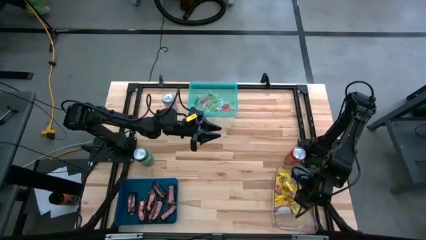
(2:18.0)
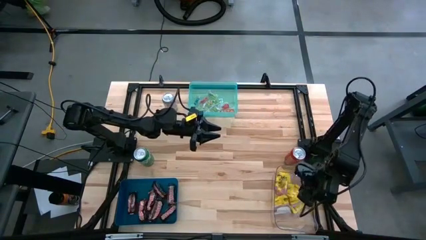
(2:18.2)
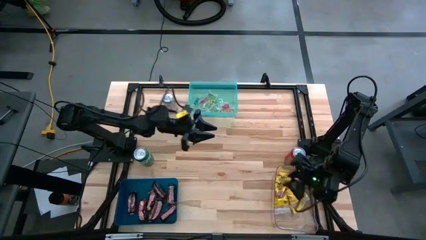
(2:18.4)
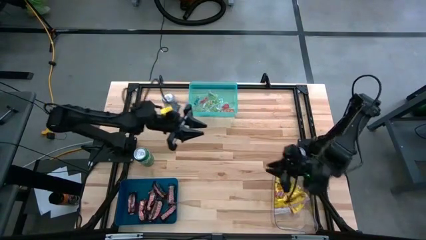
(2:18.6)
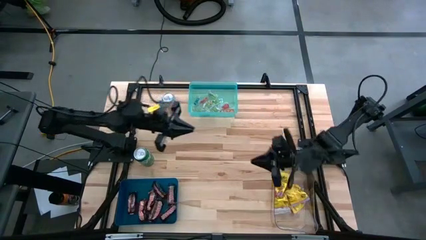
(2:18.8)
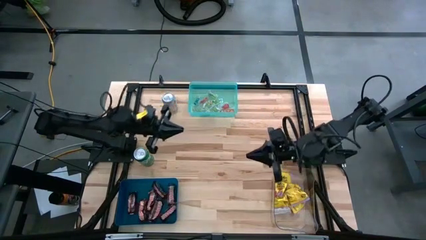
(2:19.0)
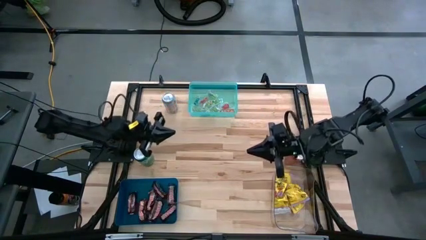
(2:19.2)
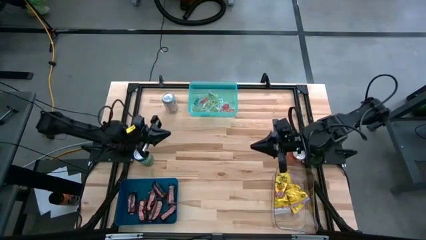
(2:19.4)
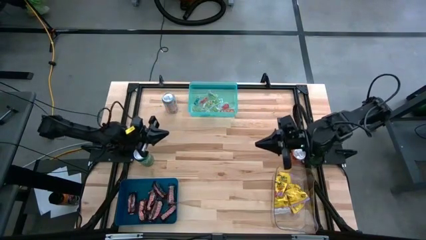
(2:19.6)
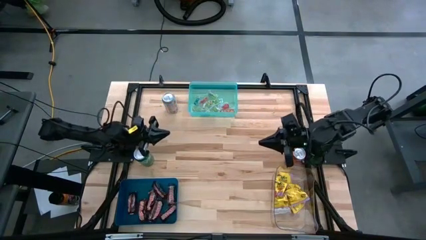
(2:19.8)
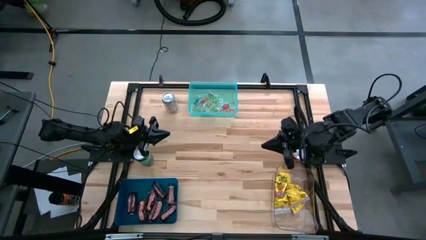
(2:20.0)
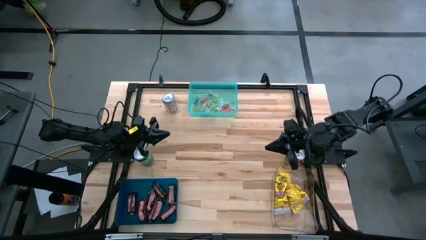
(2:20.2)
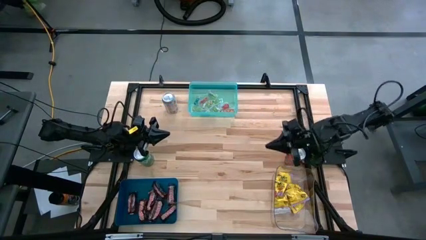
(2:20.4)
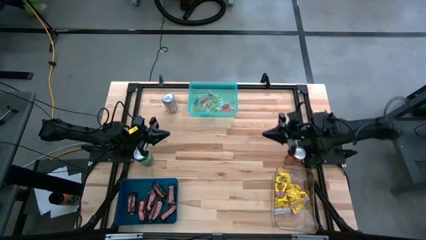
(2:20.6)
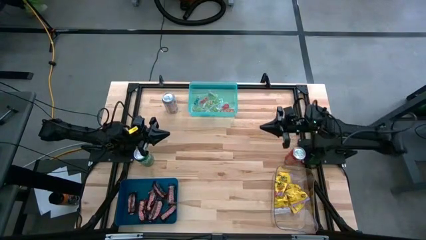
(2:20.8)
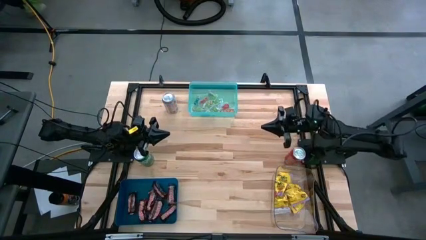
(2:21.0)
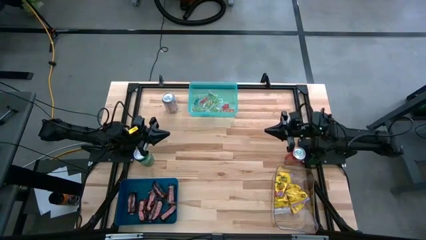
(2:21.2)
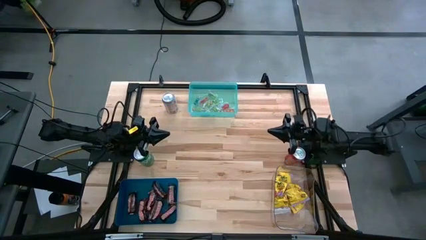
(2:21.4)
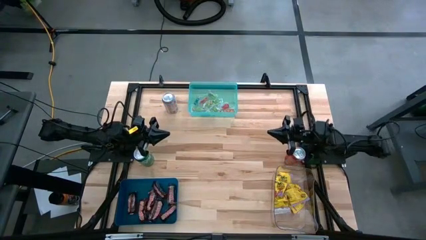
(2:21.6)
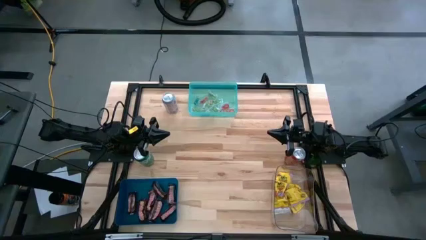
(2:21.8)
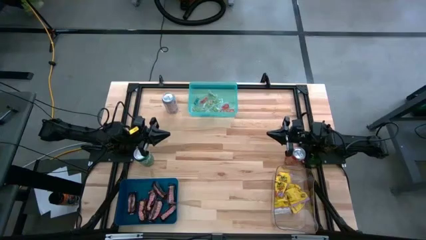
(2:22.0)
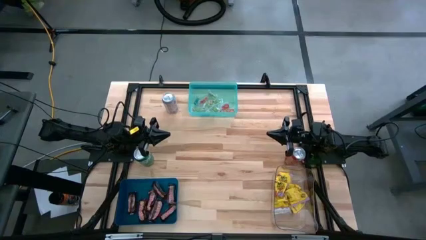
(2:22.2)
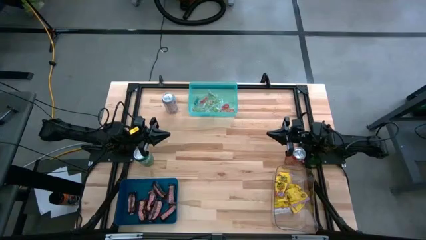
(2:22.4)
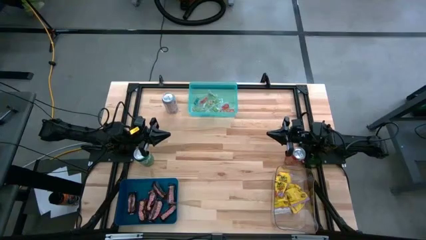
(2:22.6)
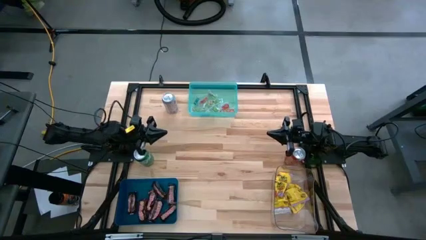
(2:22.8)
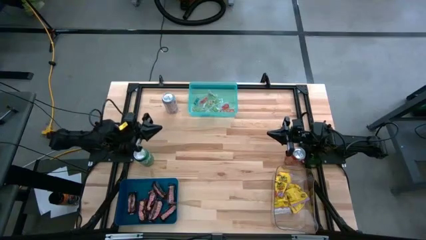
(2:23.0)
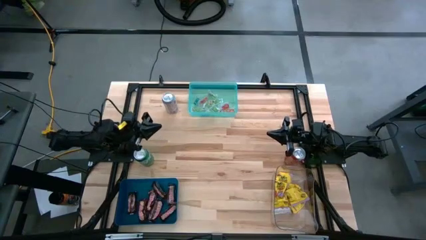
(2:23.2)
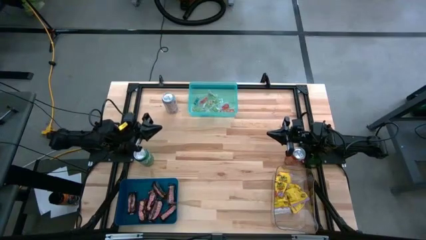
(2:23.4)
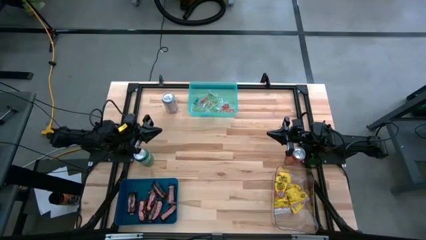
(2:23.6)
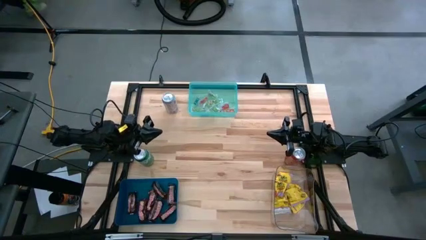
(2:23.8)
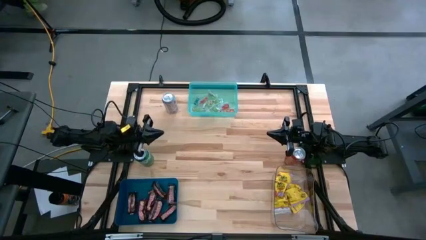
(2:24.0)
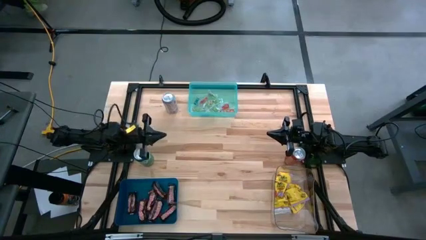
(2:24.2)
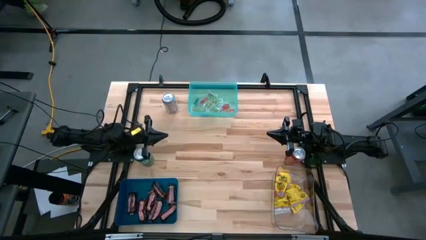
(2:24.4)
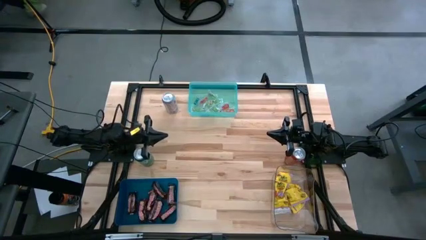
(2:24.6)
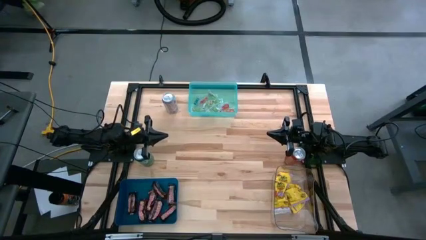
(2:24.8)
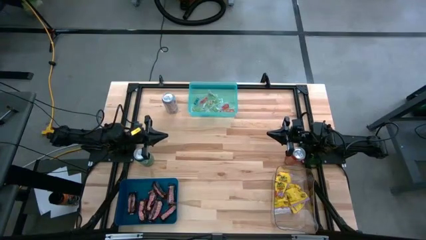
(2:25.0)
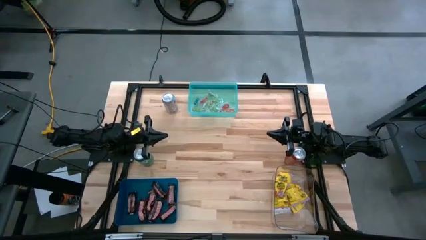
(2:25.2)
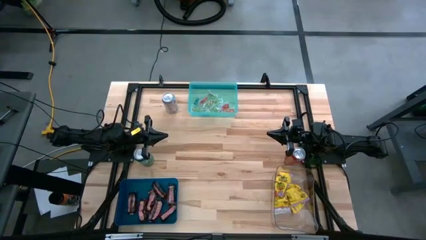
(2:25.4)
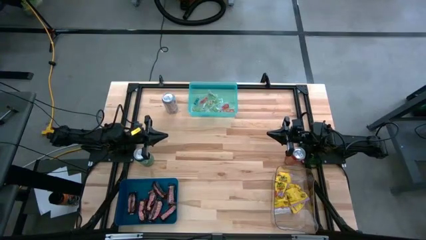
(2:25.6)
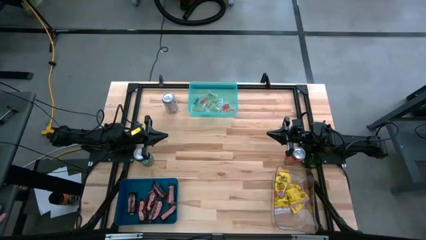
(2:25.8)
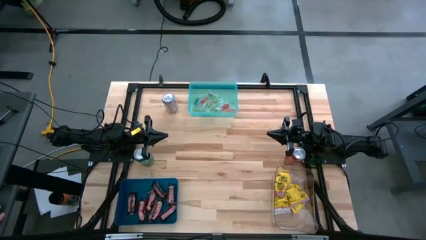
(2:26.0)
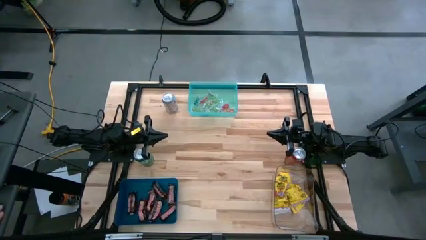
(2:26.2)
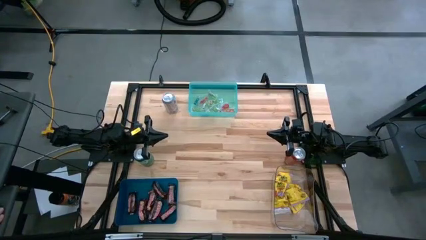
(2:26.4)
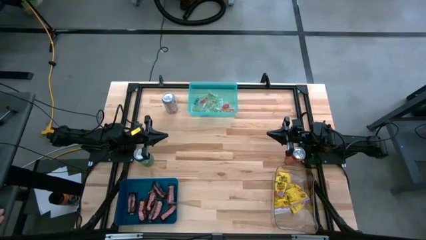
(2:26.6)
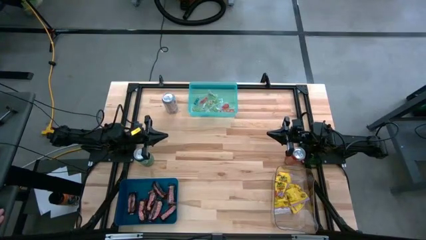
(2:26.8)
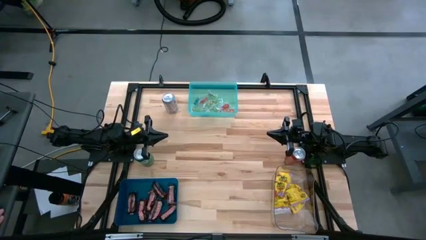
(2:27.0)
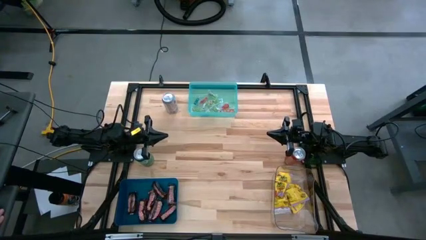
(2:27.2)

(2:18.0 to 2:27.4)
Task: Sort candy
Return to home position

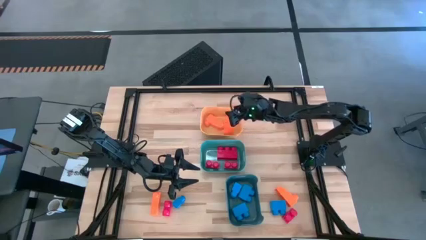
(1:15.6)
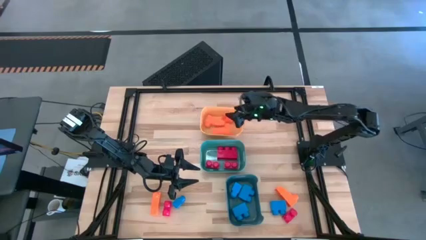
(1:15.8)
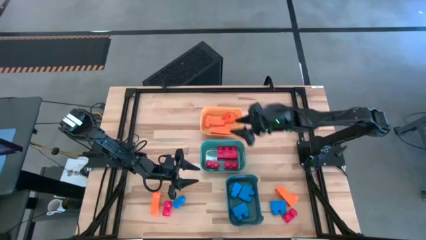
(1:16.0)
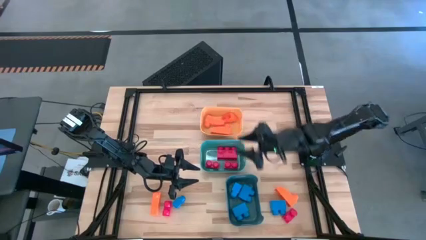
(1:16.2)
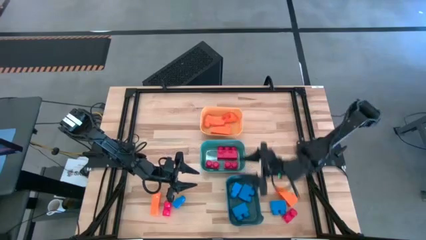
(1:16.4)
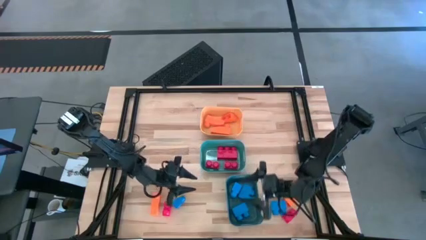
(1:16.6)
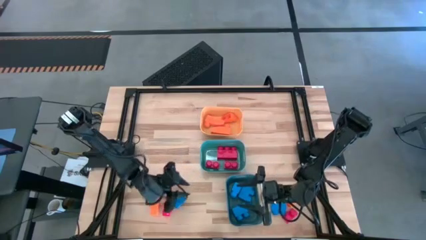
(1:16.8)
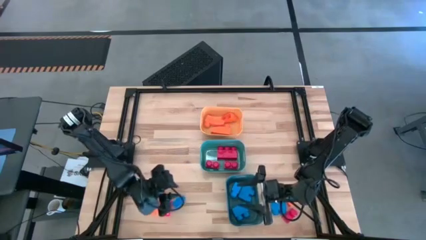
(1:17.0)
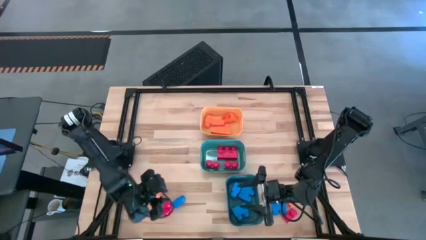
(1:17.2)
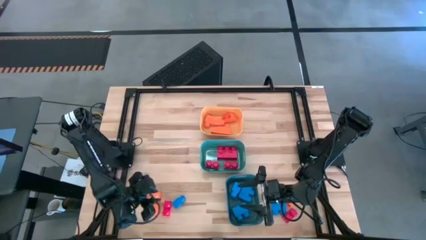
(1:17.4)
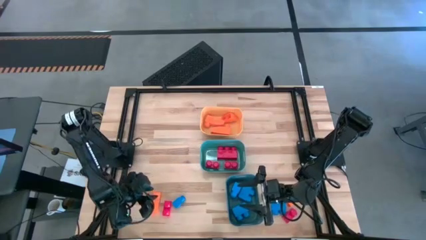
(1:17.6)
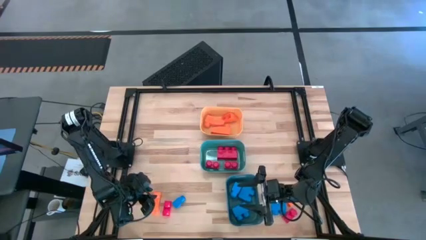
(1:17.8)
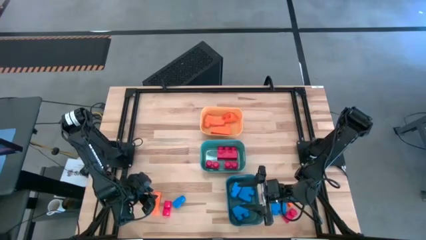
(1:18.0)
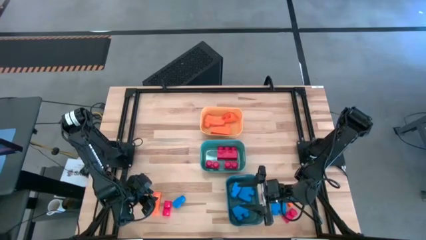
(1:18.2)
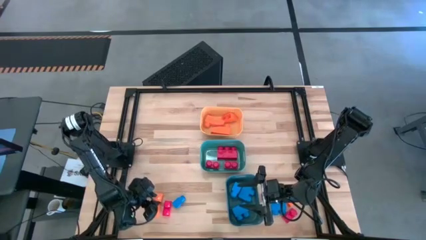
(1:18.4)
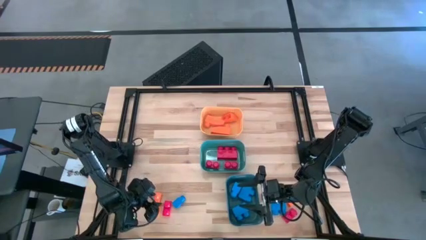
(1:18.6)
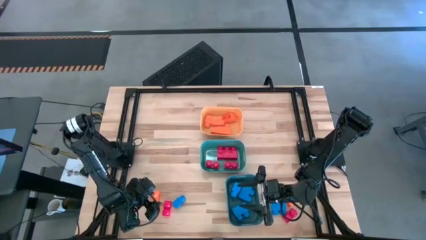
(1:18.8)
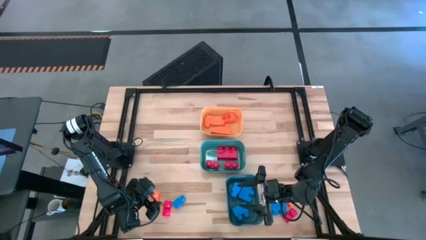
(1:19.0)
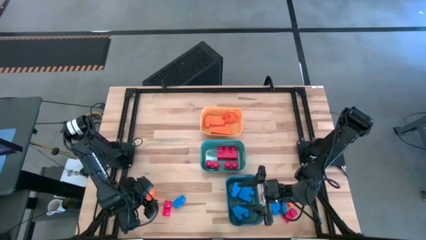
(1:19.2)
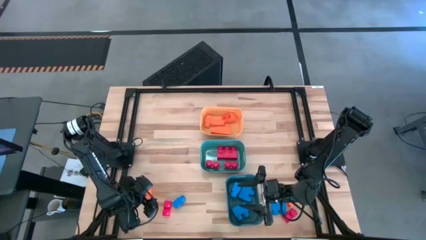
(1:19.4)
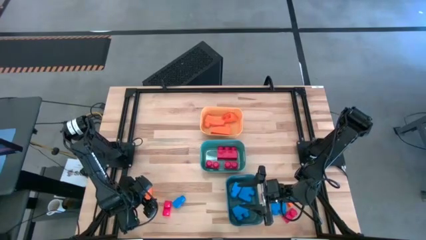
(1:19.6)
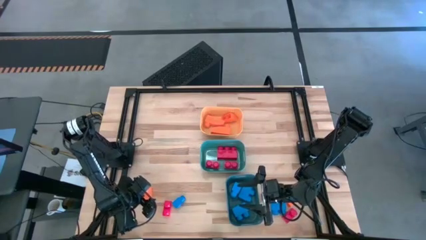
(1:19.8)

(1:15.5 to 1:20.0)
Task: Sort & place blocks by color
Put the orange game piece into the orange bin

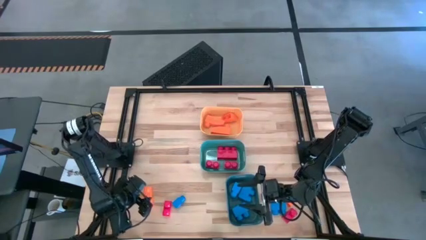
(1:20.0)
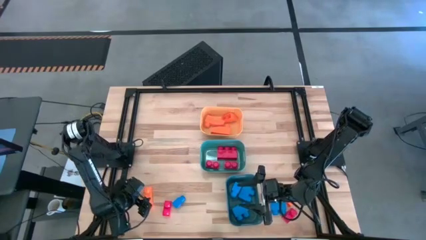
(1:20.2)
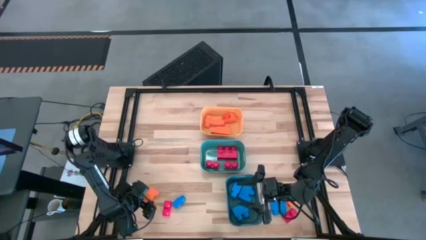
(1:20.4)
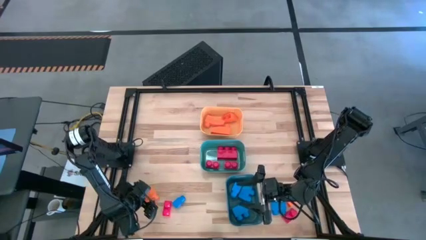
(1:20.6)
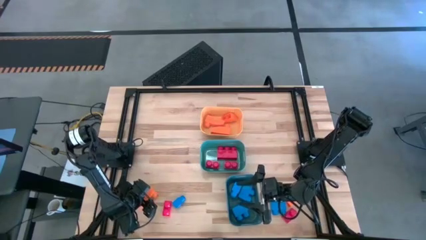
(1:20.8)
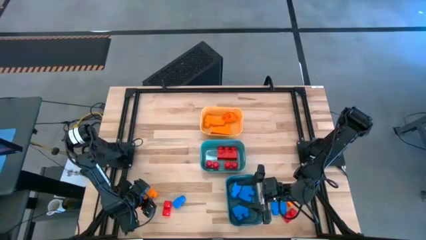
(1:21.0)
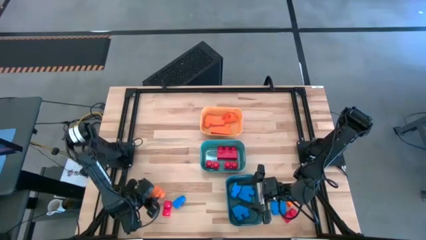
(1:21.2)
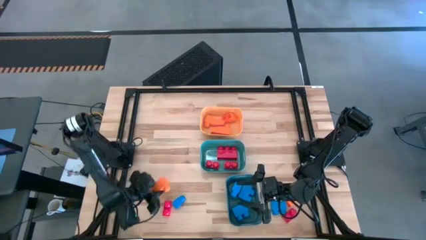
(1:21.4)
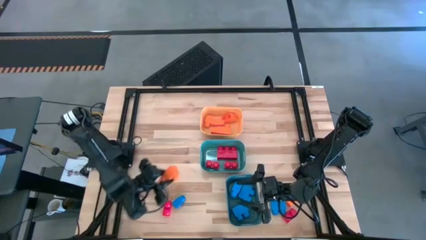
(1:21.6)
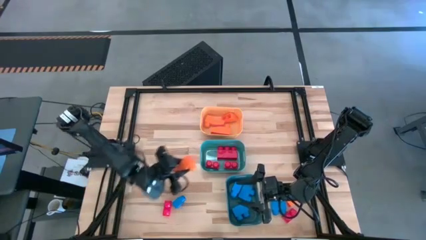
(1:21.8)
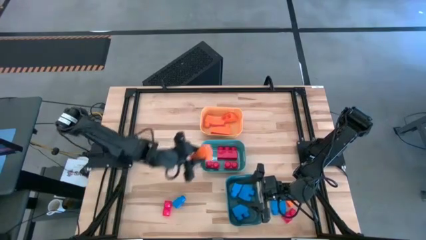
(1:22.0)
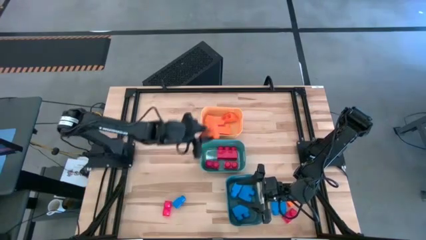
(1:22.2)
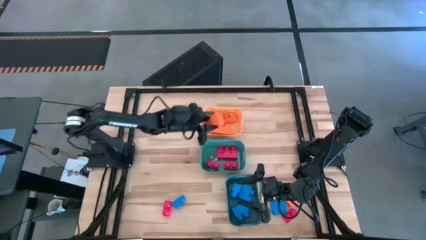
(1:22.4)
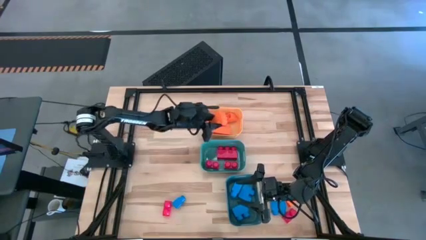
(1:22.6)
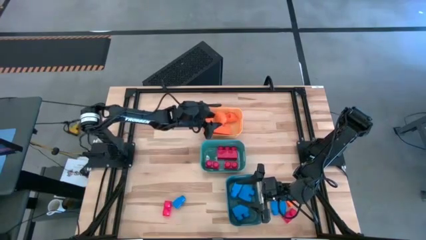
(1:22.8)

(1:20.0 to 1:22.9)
Put the orange game piece into the orange bin
